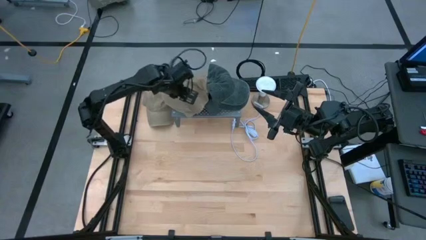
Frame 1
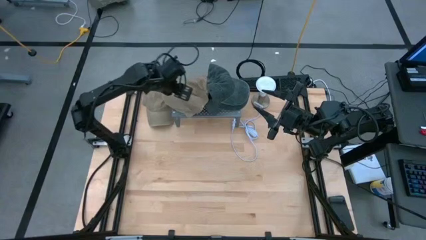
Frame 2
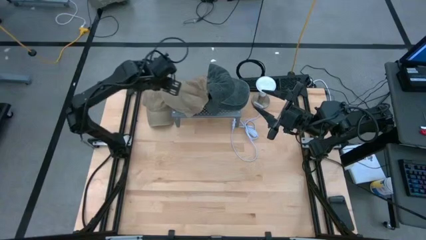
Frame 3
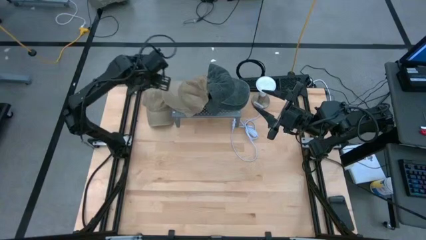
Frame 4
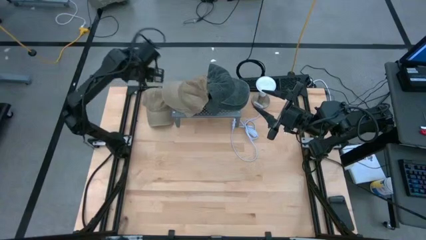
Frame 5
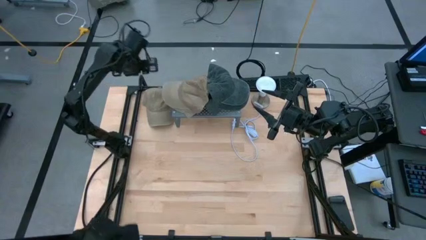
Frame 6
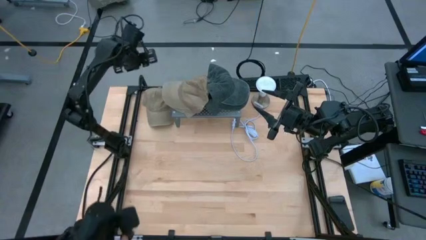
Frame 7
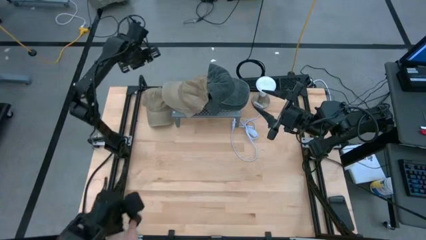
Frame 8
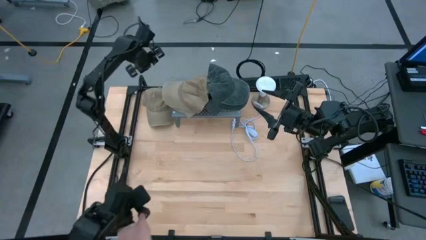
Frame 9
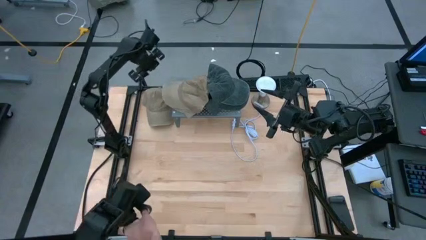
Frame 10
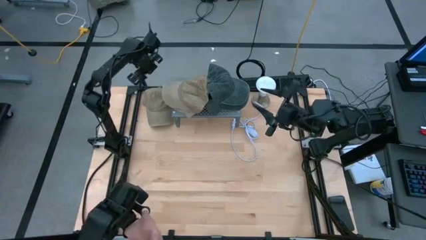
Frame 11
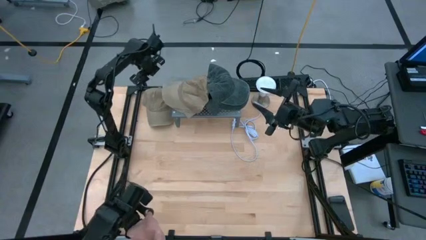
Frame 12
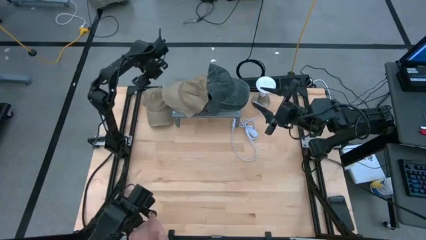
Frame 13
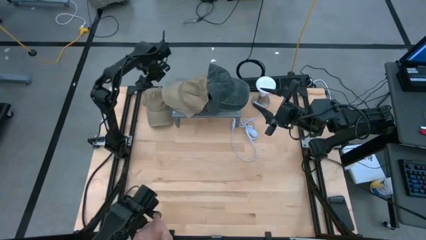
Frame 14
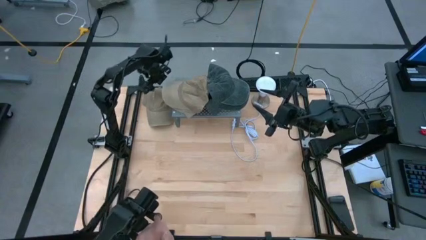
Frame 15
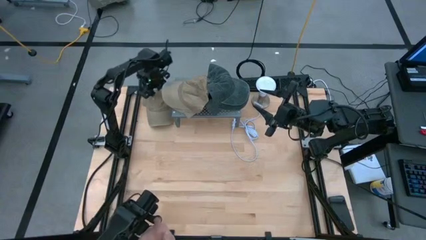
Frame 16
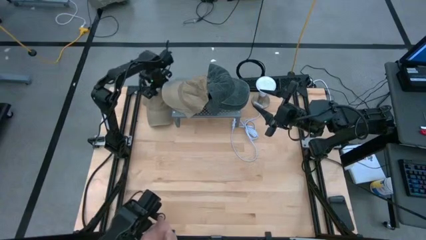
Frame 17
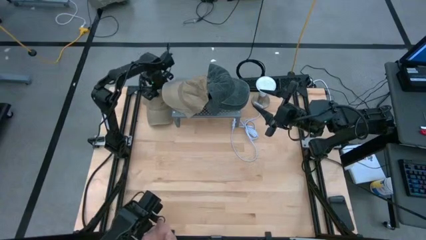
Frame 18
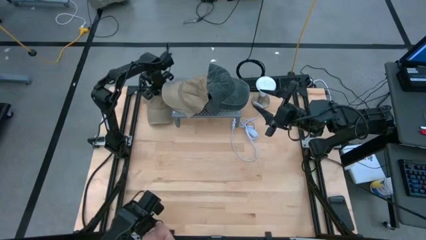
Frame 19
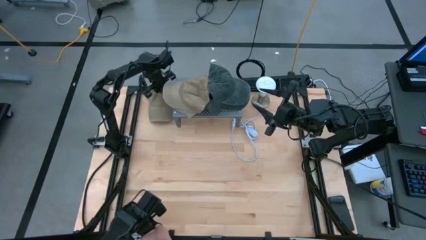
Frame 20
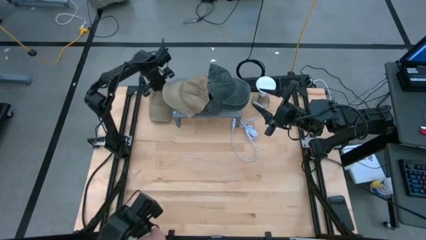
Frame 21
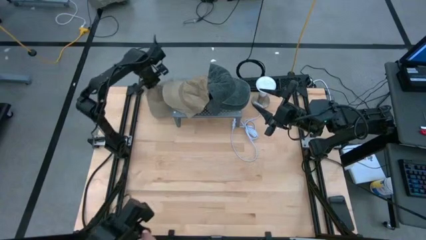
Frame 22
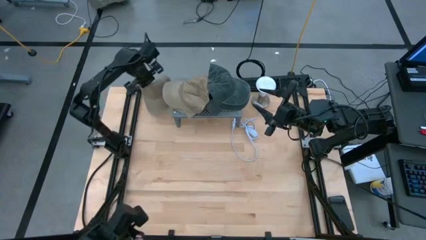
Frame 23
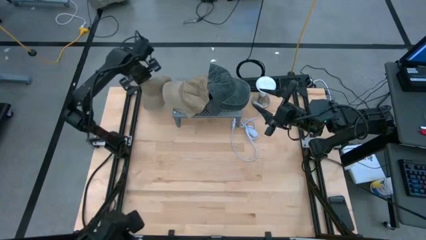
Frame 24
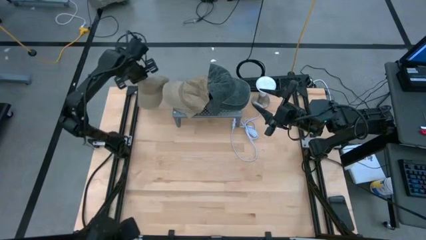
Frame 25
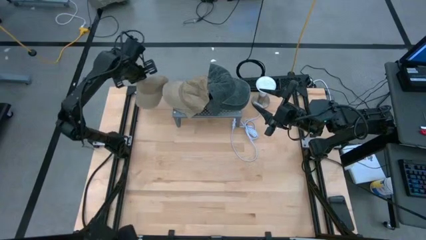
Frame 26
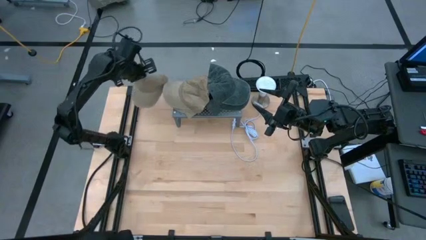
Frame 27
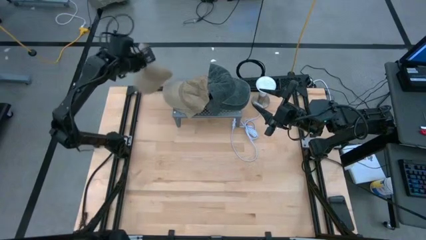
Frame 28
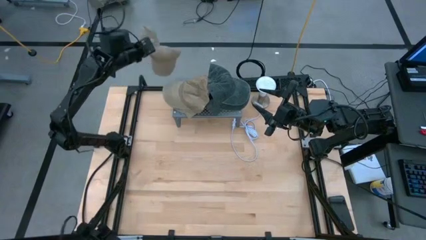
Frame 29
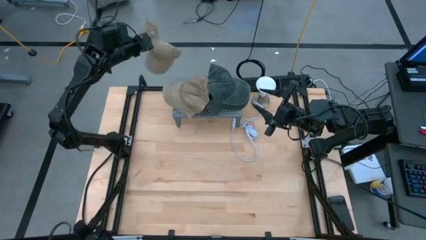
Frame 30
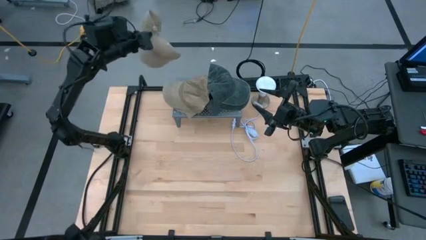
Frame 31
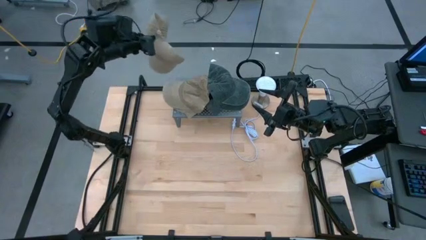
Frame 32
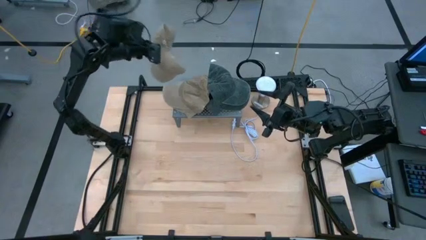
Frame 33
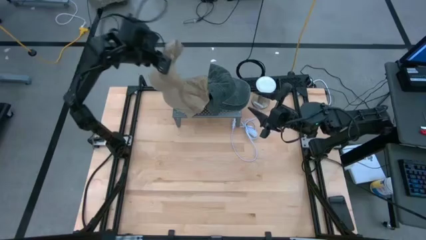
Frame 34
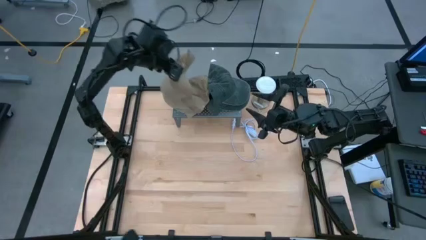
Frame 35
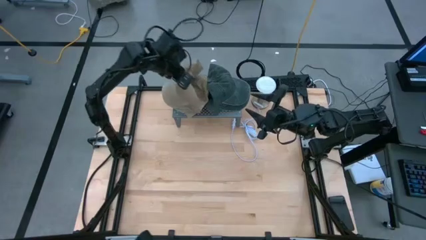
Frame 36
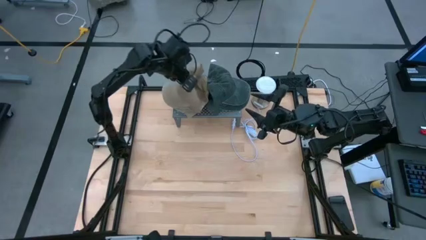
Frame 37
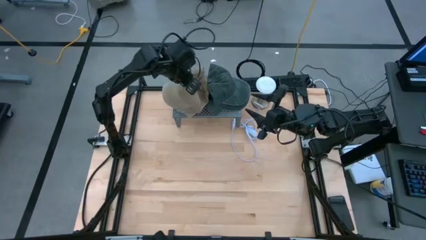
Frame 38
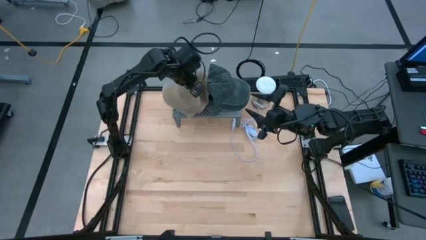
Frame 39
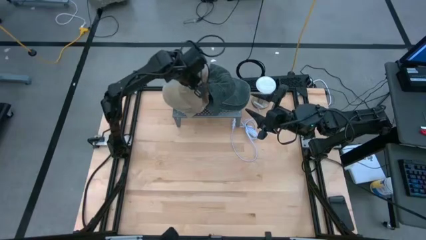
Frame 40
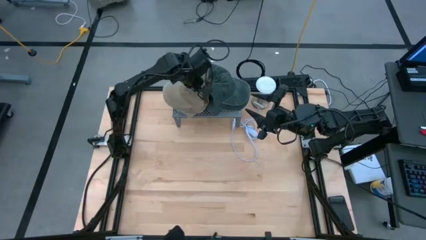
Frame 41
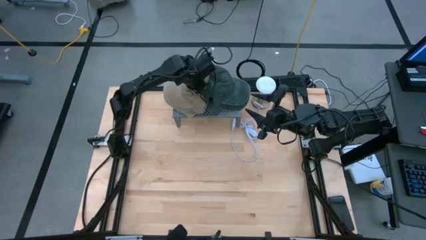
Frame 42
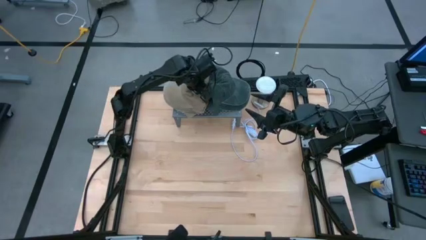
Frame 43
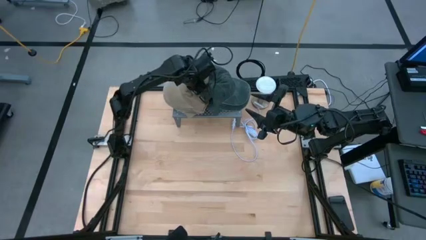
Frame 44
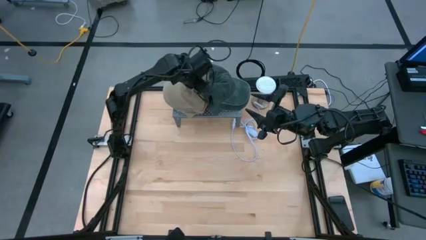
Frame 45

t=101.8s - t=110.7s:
Task: Pick & Place hat
Stack the brown cap on the brown caps on the shelf

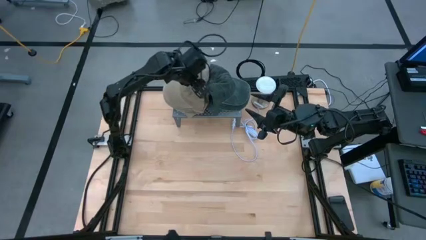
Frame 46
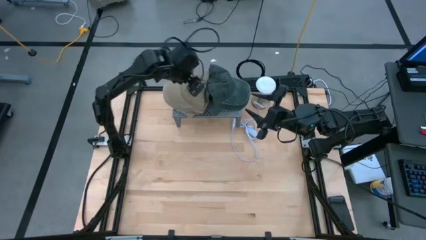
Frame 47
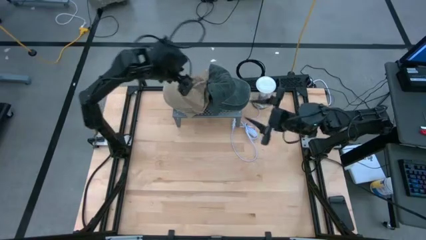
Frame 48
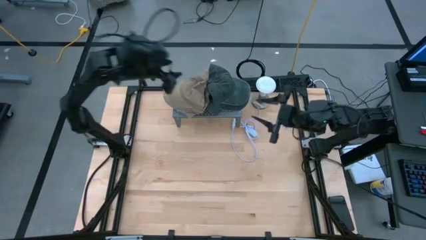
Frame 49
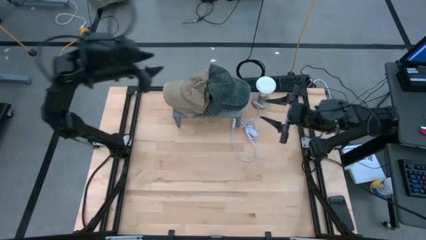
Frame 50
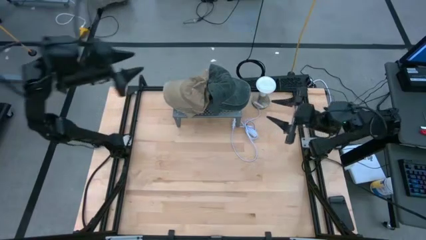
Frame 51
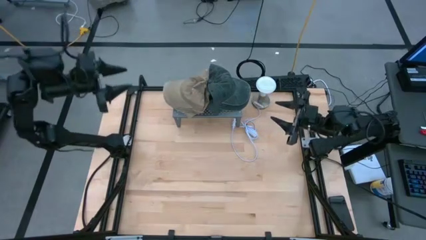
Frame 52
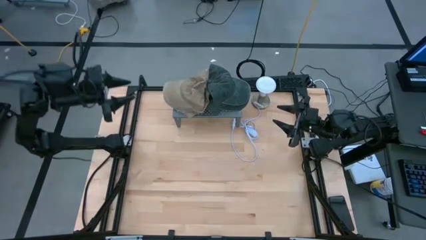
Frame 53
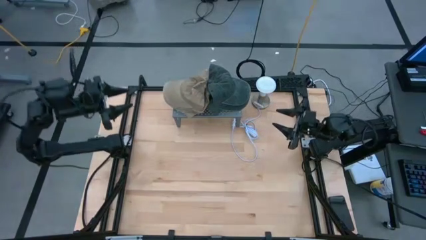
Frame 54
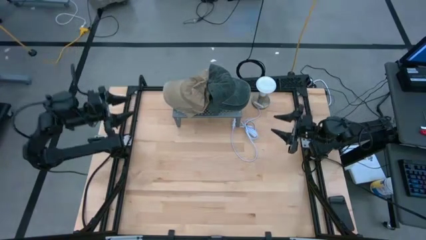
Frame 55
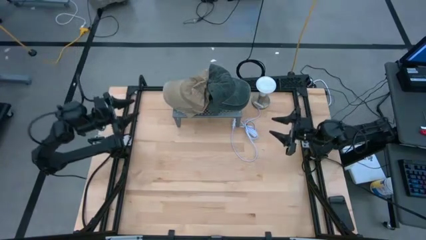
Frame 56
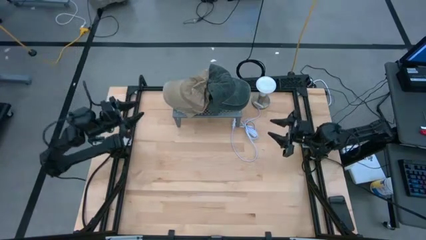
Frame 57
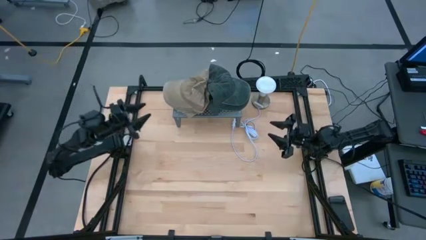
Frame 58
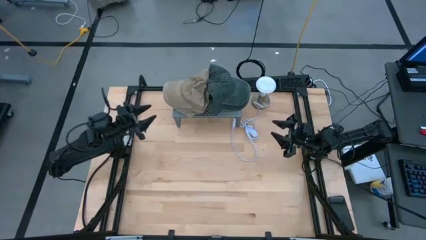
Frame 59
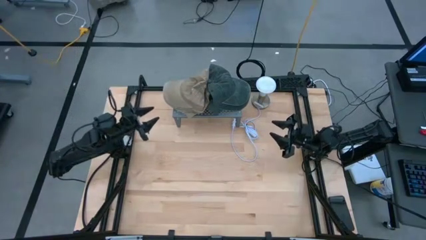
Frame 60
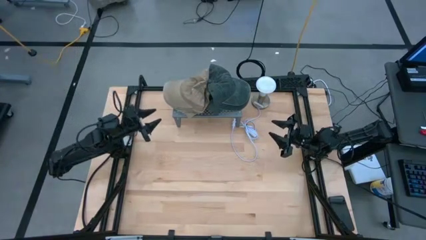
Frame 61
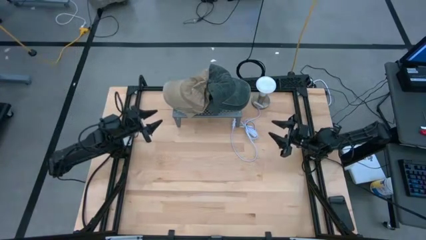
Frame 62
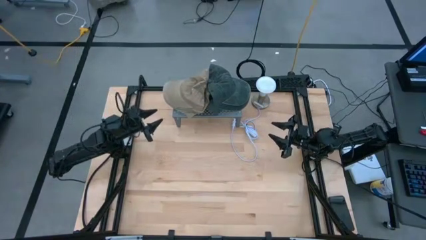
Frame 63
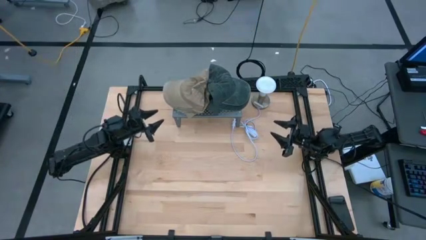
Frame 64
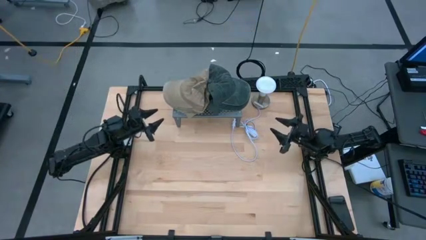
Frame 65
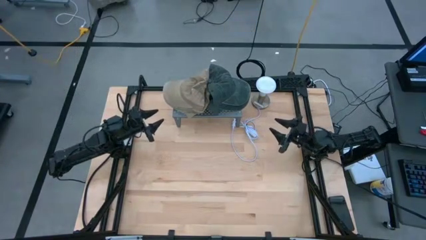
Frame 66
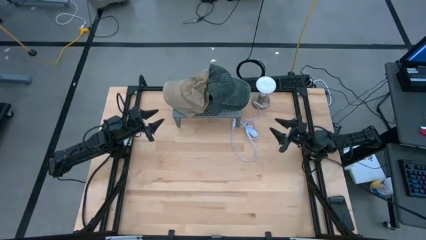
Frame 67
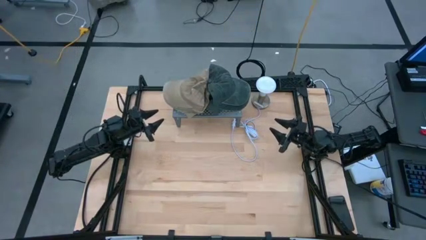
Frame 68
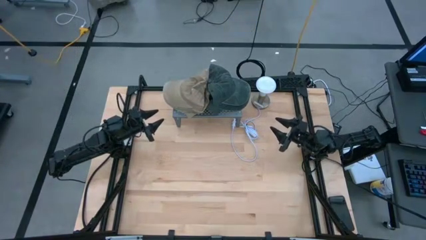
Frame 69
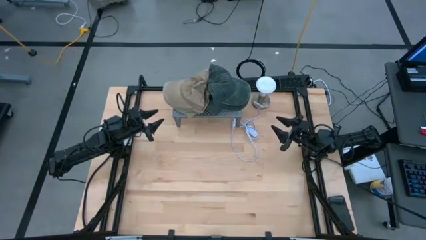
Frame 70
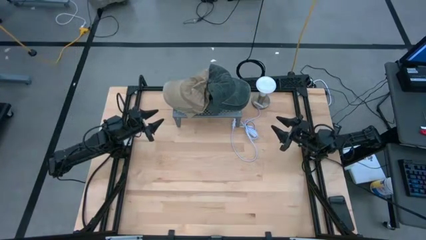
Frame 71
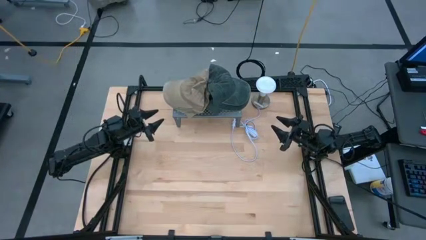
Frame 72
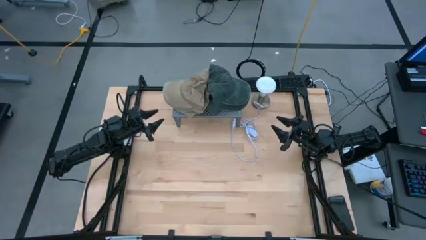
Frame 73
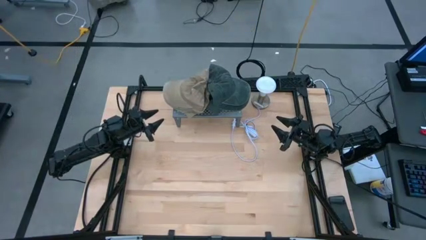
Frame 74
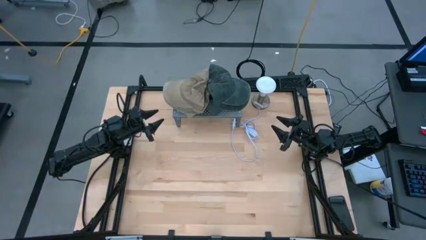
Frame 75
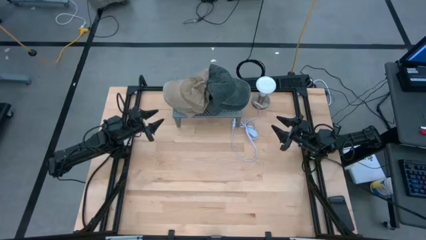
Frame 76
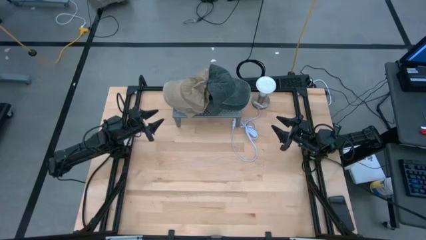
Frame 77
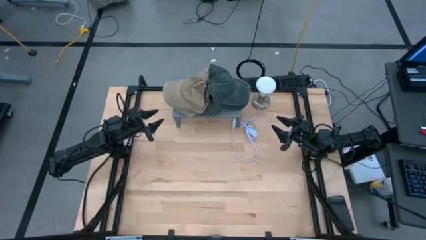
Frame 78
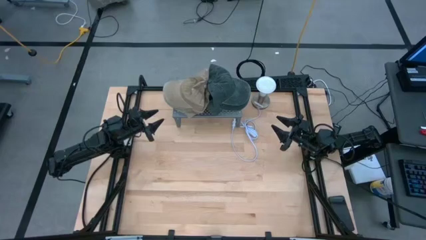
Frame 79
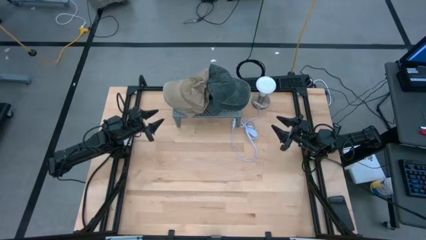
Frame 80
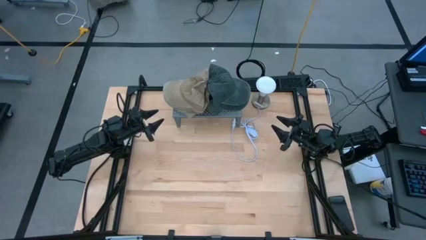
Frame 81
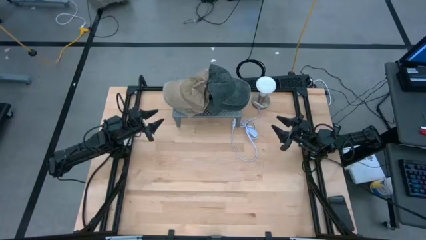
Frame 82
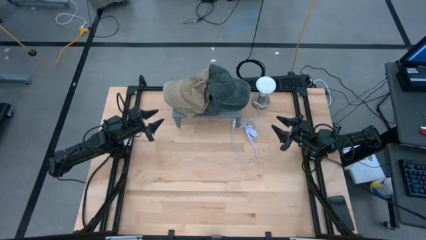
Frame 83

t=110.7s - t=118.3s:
Return to Home Position

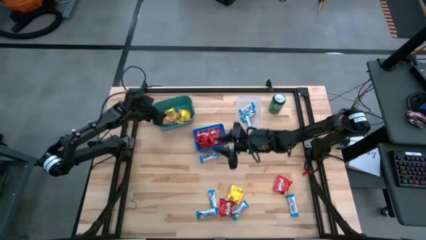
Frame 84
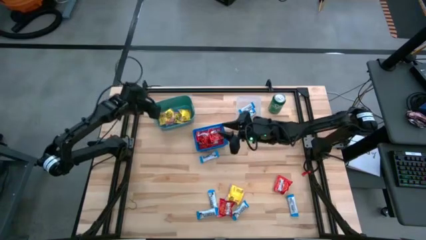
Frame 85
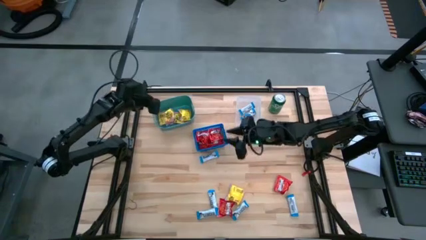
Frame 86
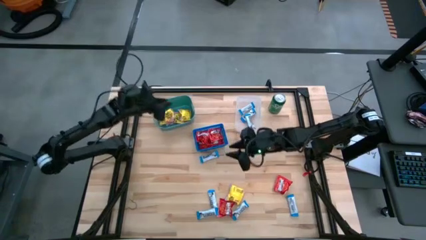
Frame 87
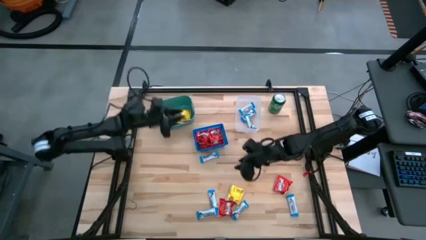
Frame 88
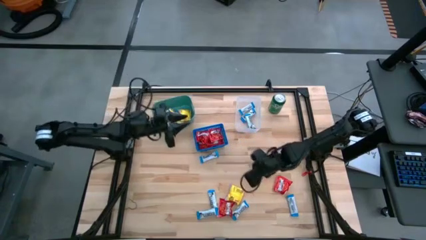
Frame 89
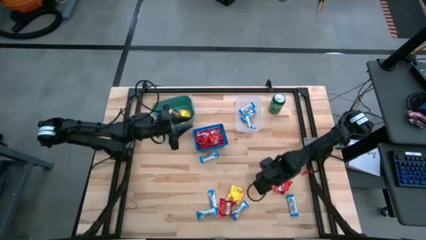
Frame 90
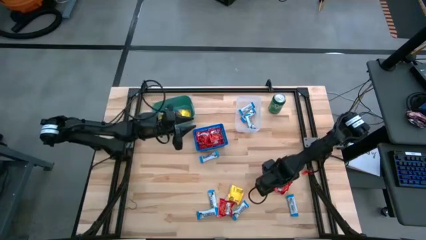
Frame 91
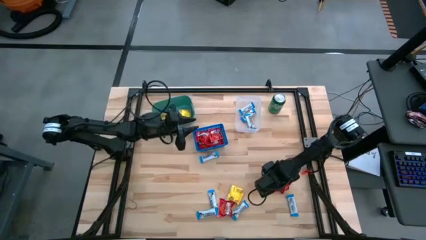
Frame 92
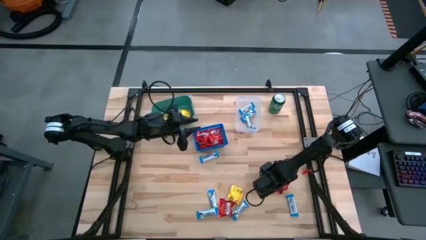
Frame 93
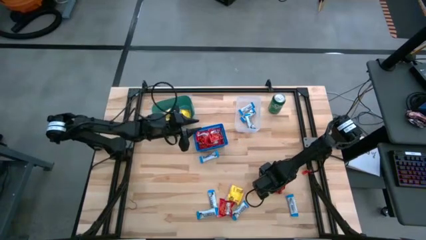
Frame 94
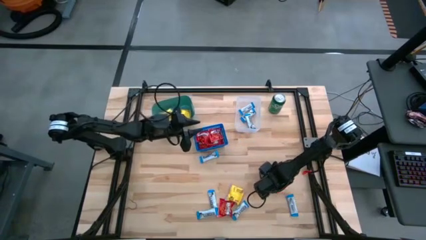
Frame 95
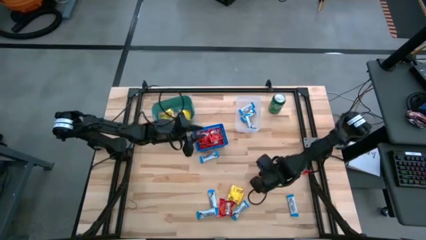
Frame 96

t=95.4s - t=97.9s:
Task: Sort candy
Put the skittles candy into the blue basket
